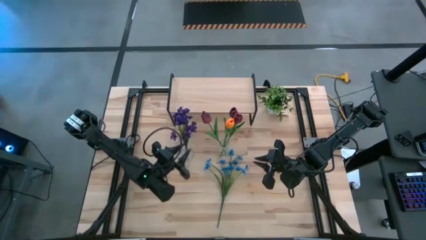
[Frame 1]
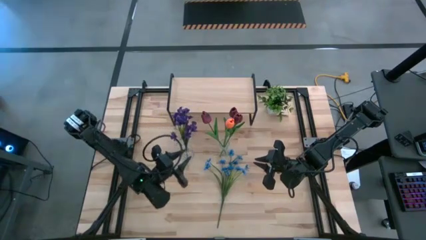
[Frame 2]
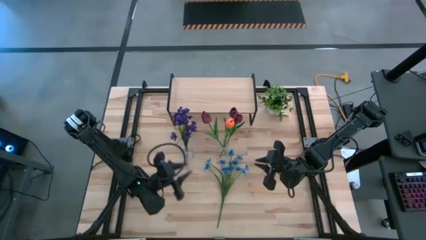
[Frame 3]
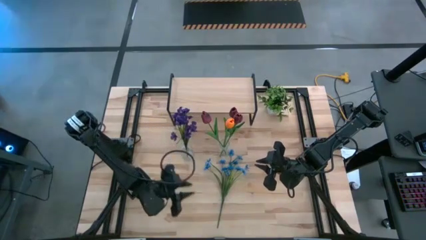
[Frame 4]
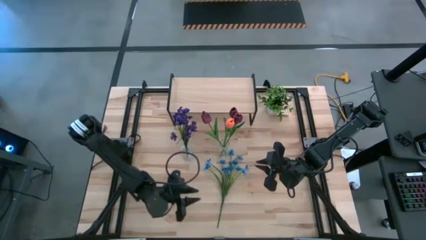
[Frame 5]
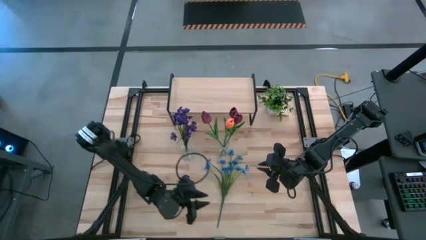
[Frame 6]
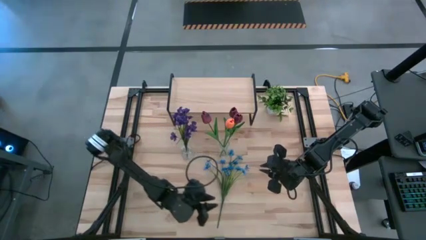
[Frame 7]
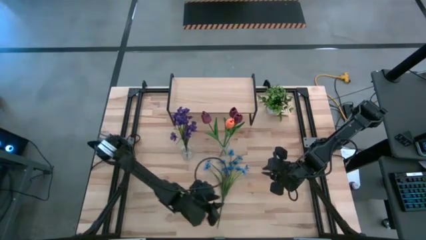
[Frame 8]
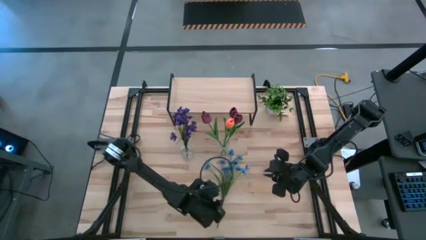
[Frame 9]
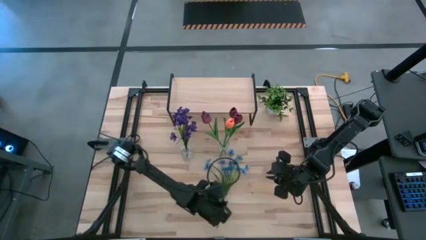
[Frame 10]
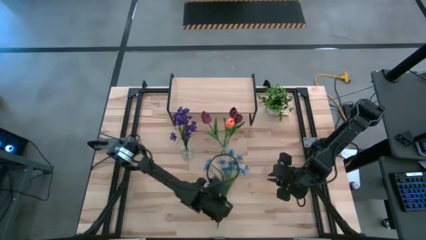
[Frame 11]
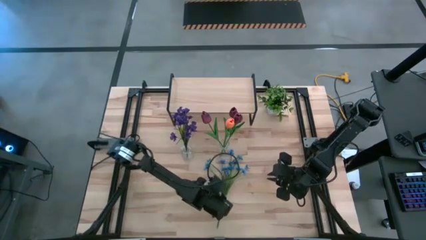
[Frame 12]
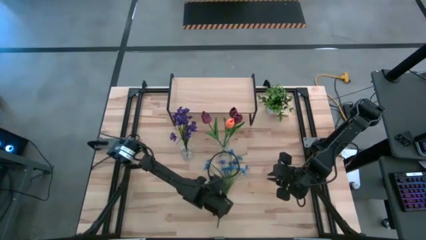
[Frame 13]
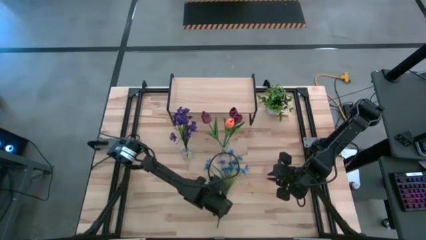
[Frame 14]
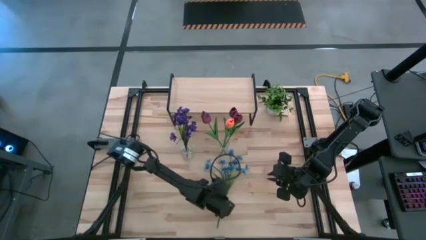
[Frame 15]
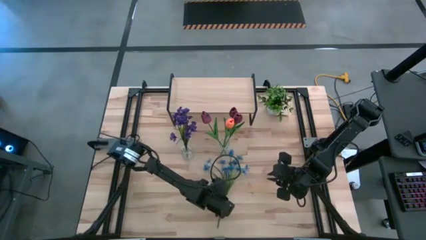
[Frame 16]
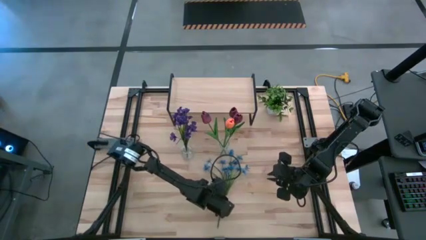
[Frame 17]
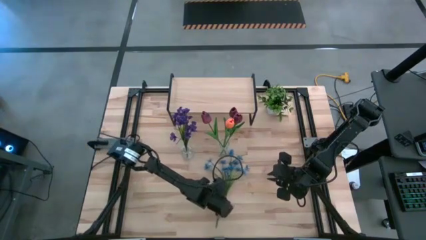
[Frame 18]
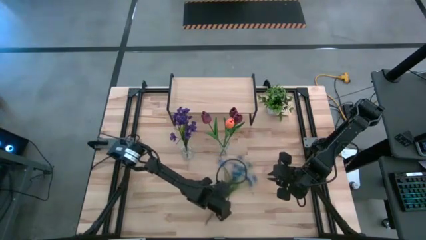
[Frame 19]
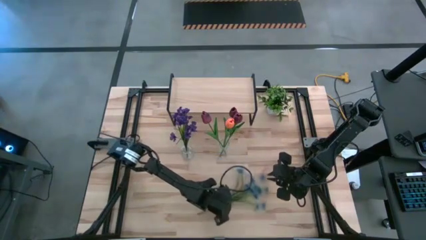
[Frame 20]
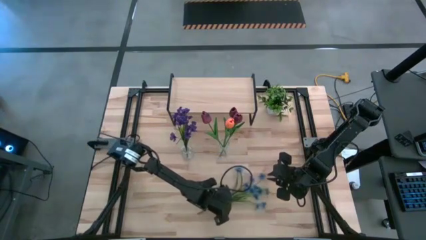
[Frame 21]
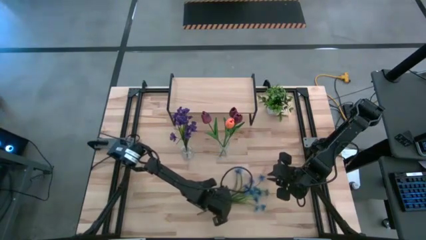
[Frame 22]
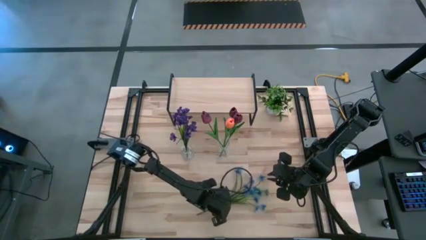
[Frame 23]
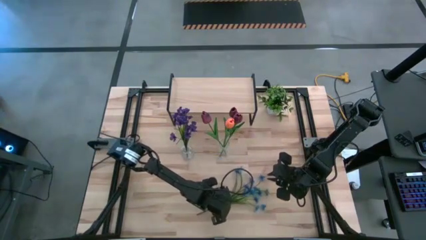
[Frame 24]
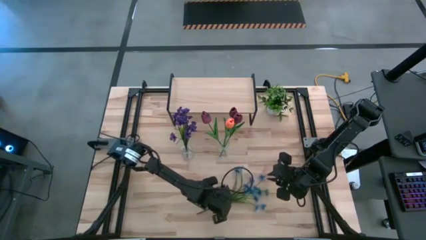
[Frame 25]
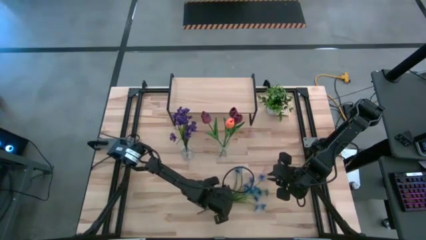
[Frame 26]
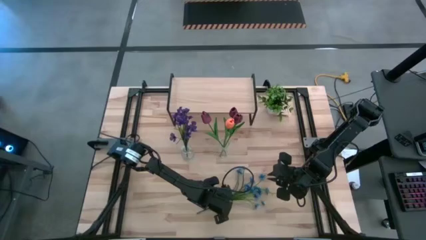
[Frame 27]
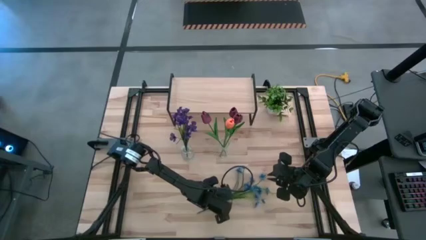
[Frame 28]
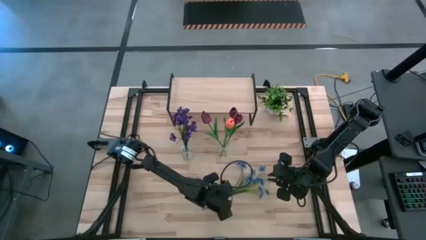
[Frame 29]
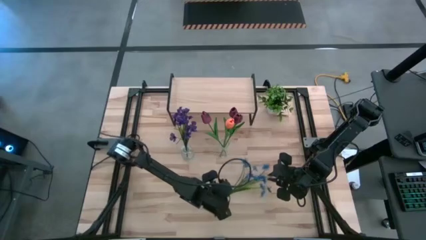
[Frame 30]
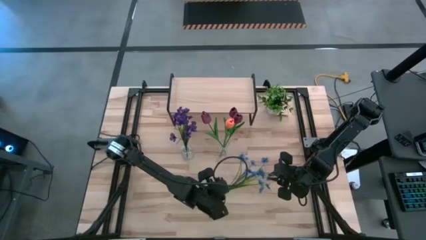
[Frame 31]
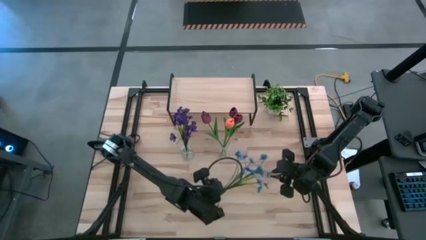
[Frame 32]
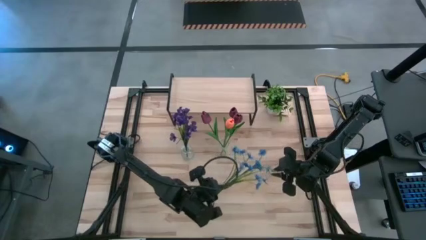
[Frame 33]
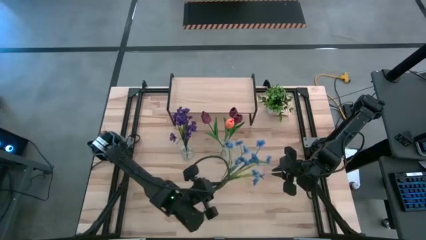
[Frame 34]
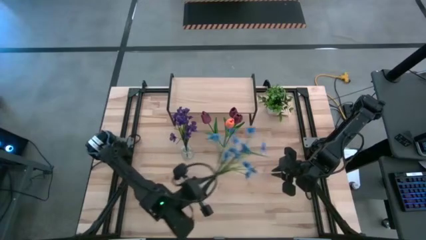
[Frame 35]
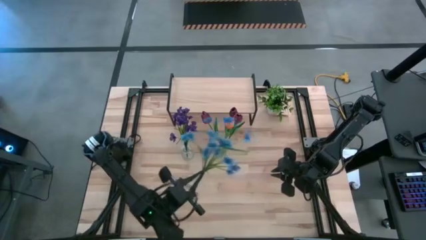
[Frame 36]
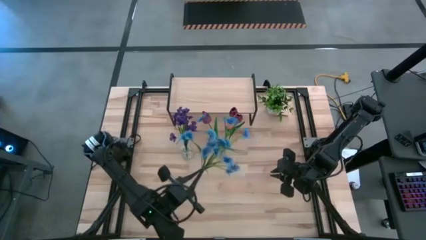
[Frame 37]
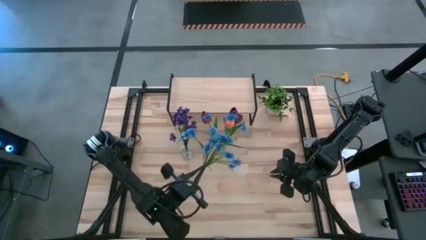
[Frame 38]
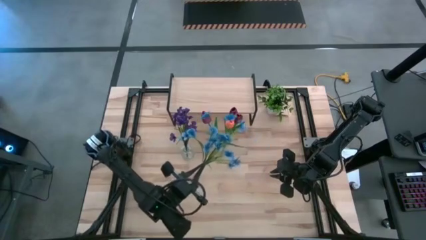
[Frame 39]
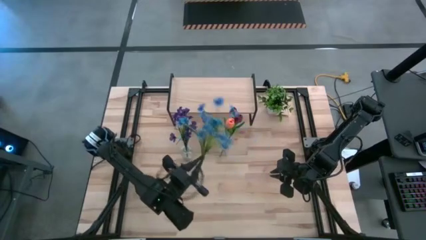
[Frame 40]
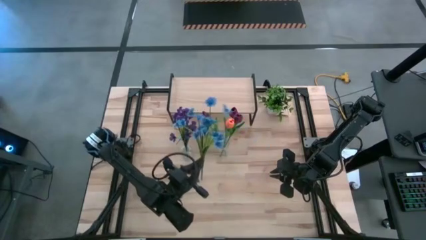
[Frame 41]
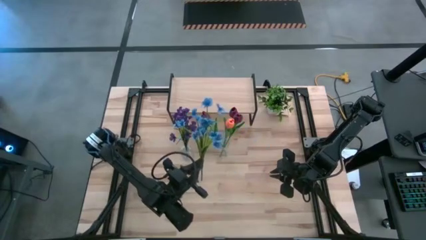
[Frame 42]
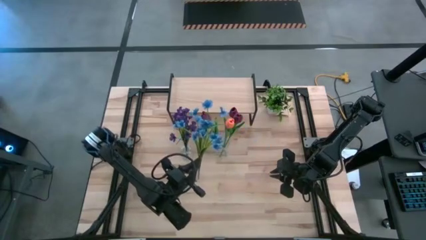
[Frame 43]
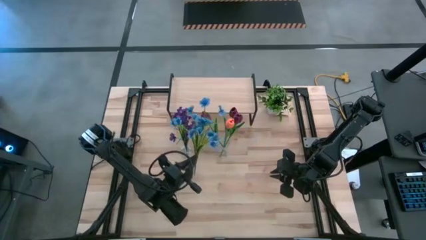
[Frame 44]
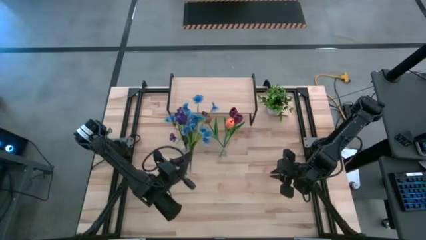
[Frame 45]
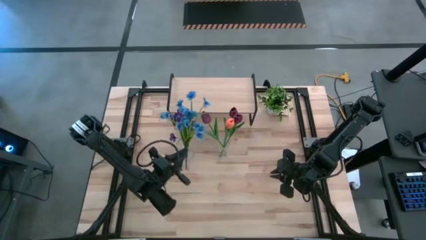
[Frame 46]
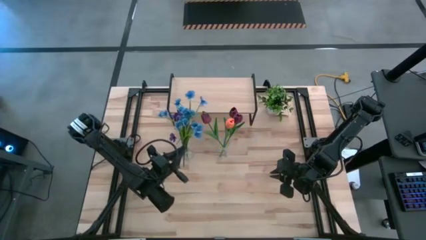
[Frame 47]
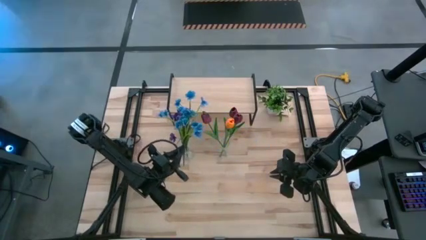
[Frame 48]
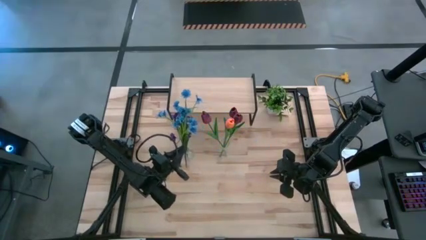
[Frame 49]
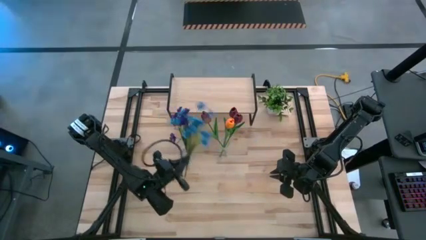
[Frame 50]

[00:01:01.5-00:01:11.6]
Task: Pick and place flowers into a vace then onto a shelf
Put the blue orchid into the left transparent vase

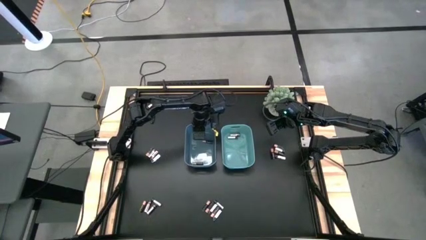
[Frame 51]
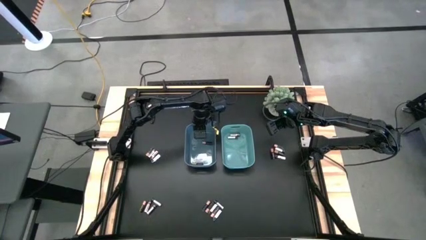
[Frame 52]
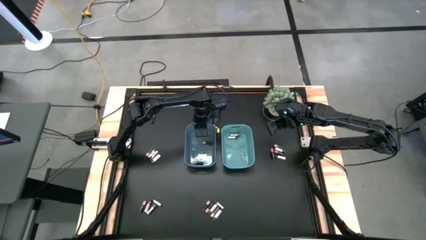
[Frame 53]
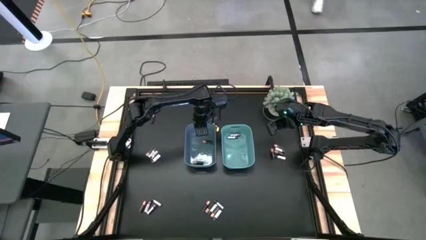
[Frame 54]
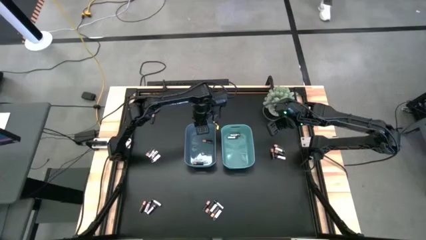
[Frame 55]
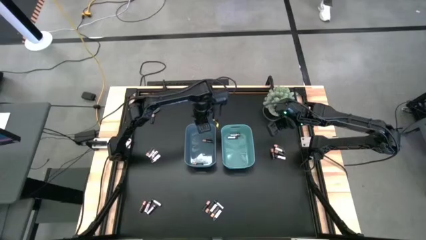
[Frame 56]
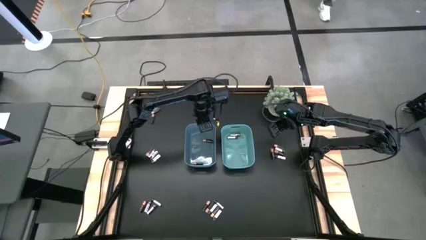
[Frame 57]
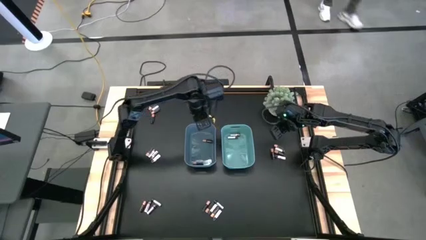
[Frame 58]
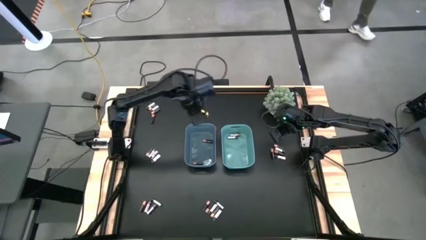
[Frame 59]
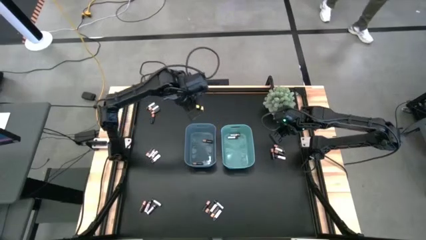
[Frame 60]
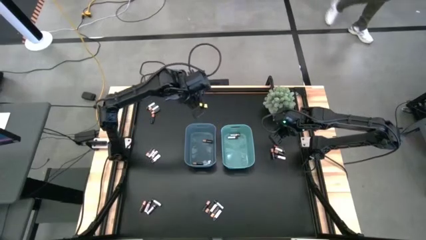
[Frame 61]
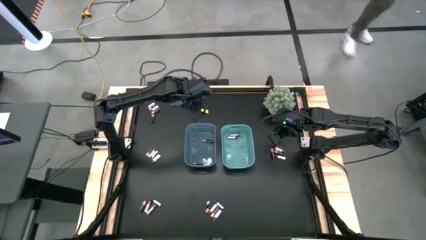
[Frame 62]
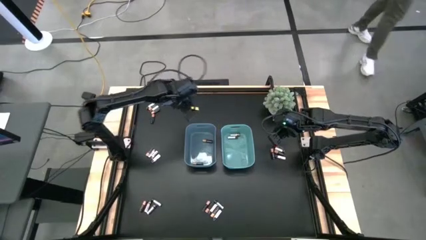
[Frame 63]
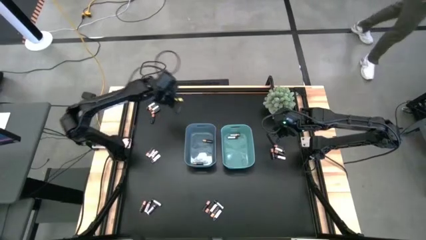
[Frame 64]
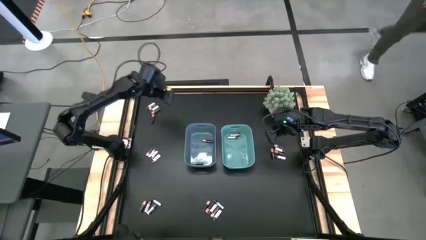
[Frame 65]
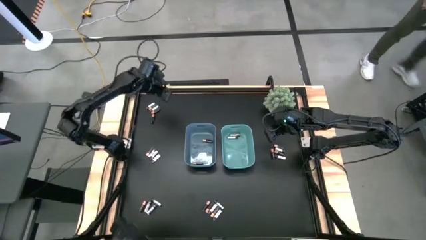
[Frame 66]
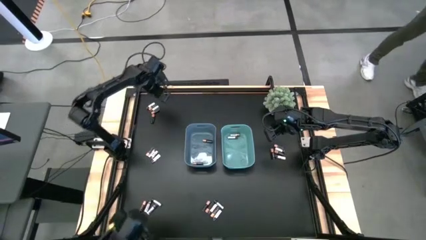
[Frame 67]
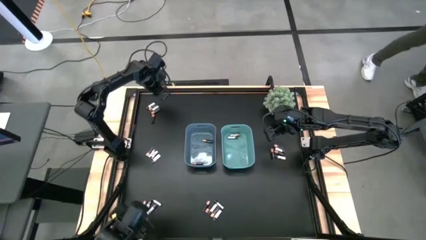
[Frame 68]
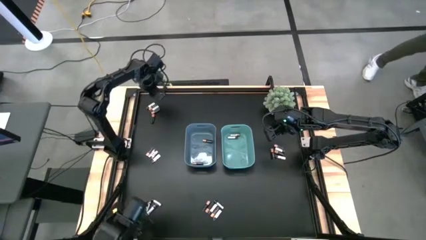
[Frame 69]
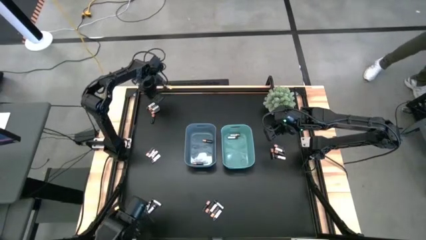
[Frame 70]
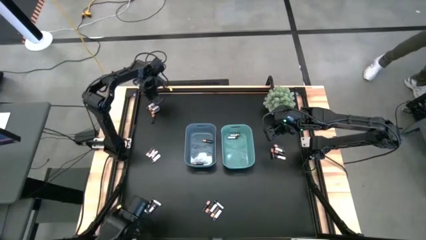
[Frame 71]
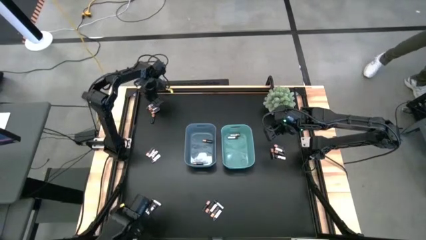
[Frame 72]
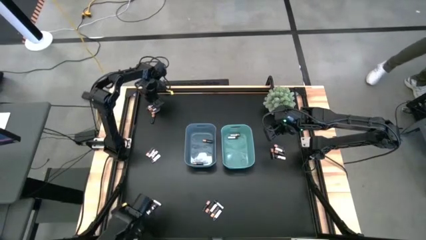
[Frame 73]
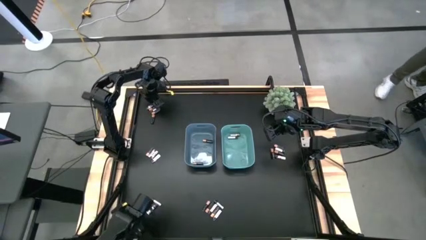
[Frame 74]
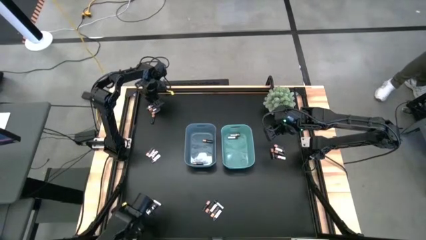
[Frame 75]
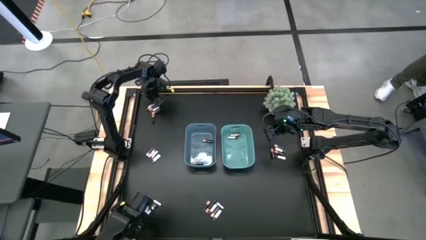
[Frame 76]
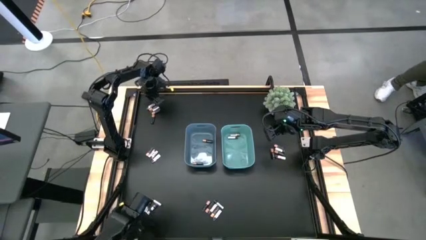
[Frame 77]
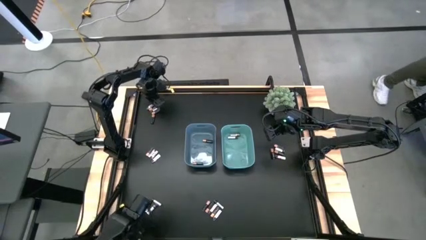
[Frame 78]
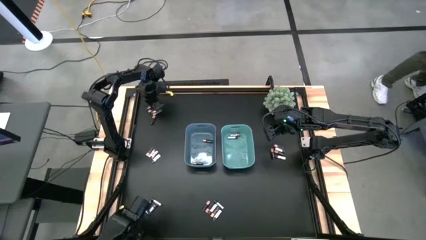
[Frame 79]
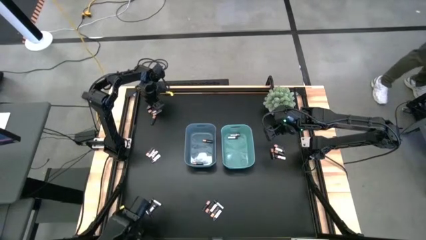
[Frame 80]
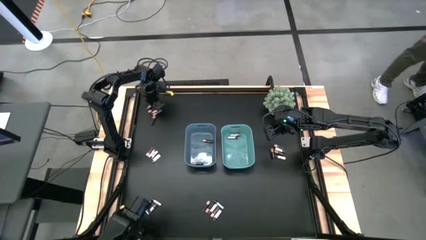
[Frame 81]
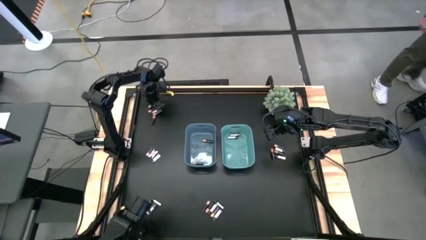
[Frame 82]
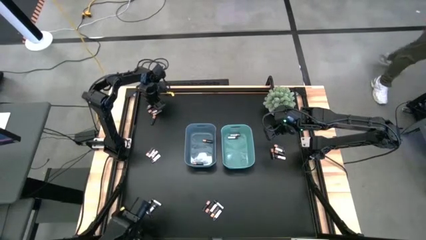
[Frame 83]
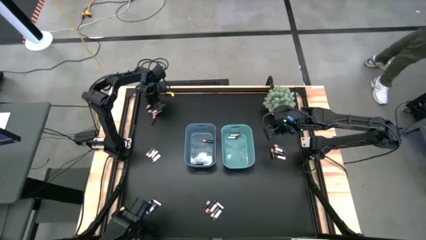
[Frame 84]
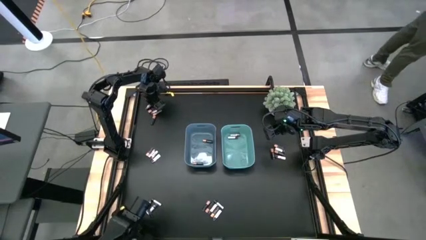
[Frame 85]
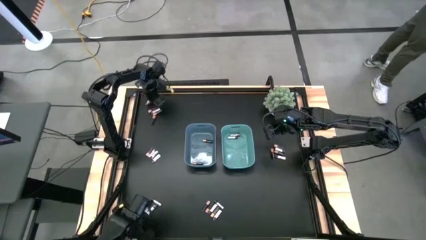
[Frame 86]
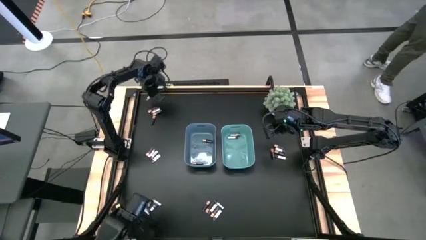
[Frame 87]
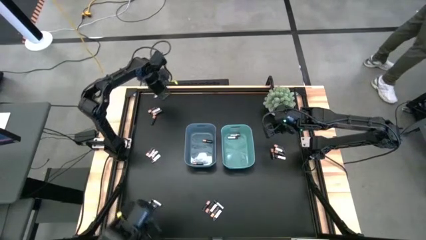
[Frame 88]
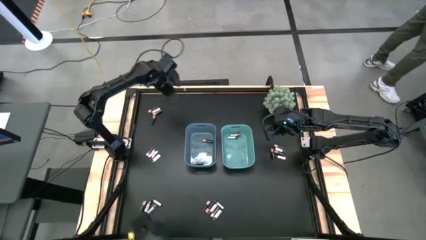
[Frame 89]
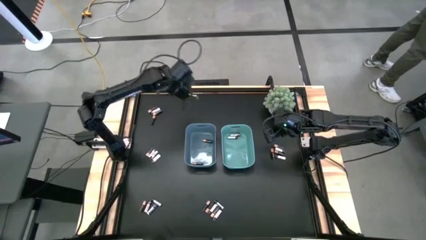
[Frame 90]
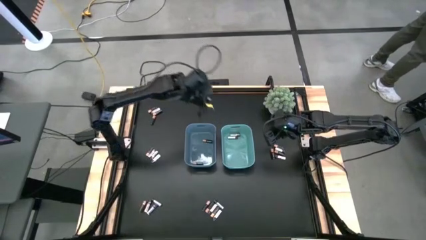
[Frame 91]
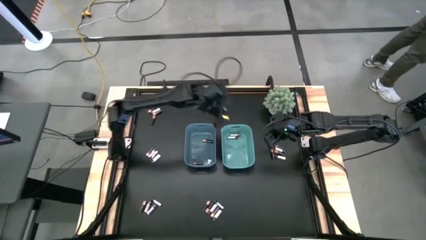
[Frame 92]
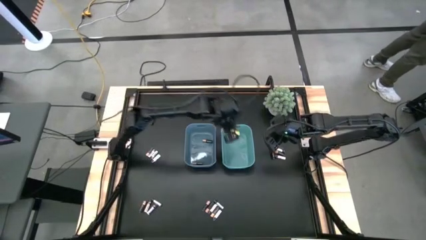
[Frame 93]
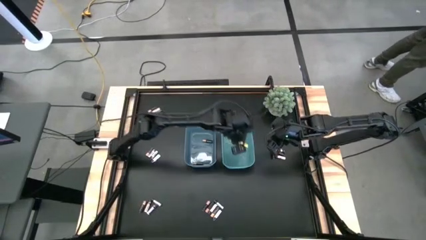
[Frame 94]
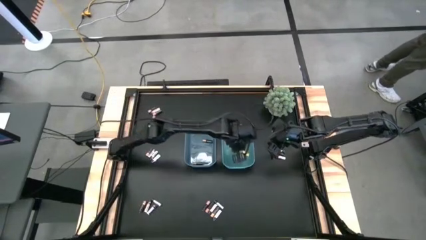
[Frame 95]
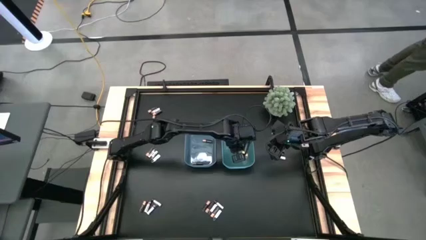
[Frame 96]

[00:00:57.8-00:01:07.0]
Task: Sort batteries
Put the white battery into the green bin
